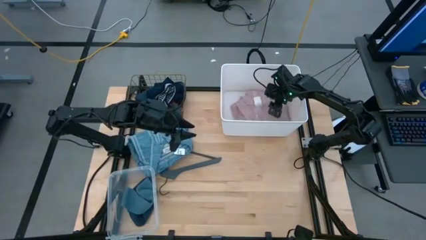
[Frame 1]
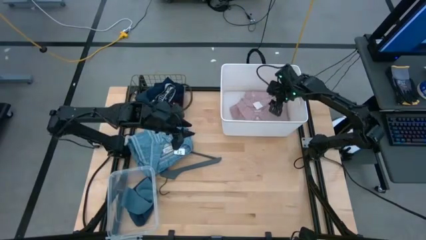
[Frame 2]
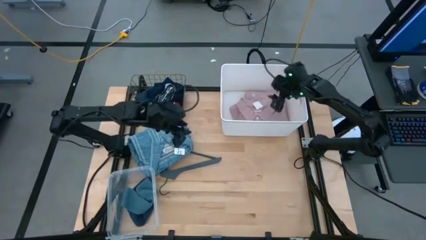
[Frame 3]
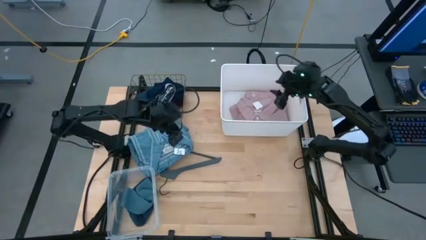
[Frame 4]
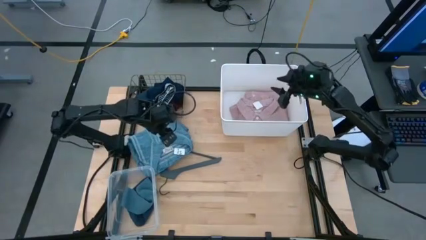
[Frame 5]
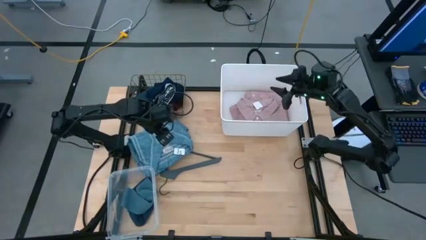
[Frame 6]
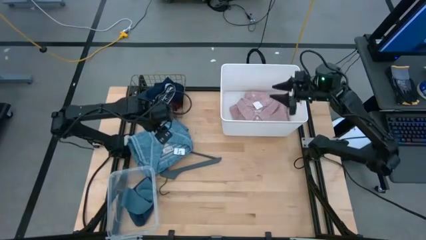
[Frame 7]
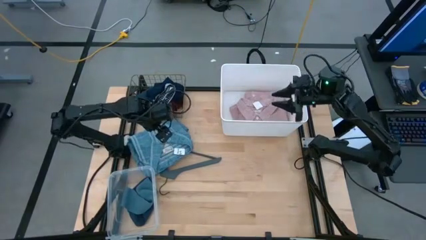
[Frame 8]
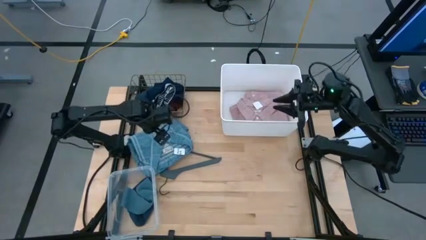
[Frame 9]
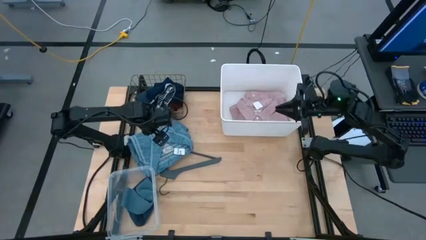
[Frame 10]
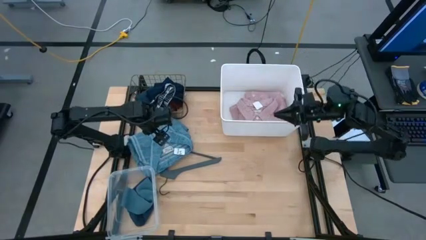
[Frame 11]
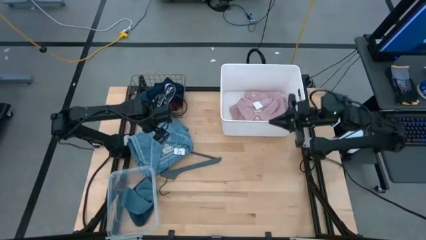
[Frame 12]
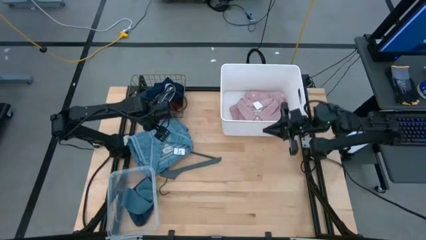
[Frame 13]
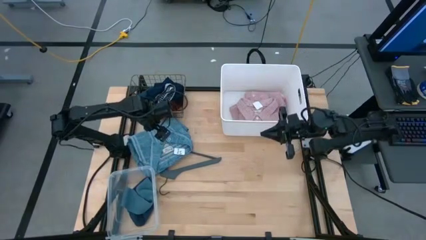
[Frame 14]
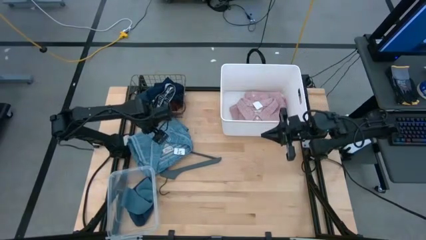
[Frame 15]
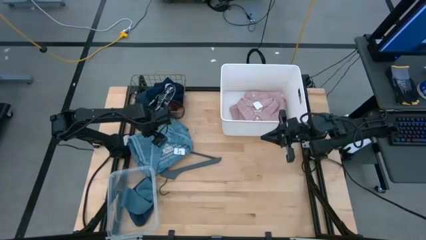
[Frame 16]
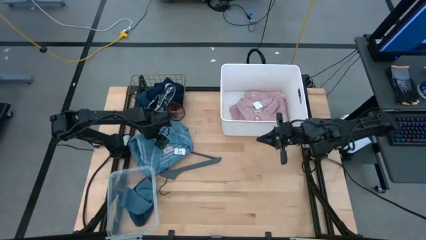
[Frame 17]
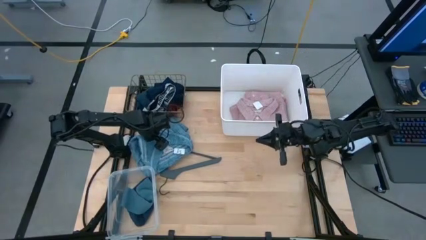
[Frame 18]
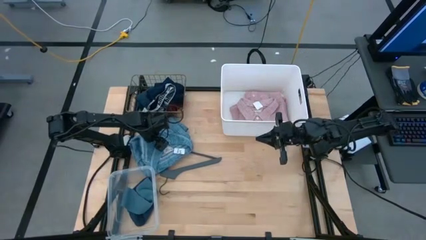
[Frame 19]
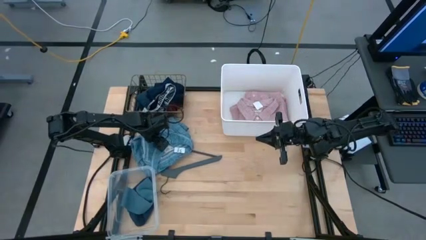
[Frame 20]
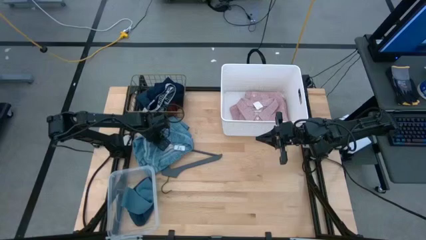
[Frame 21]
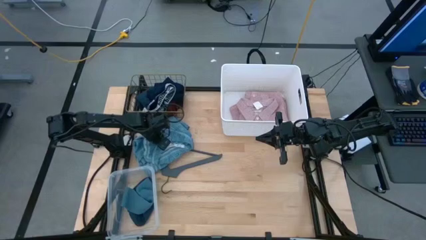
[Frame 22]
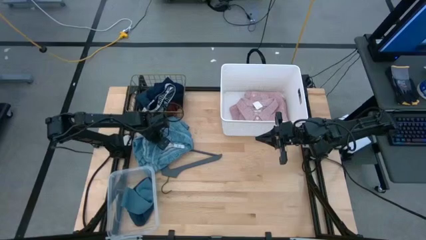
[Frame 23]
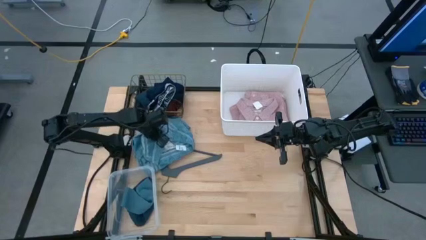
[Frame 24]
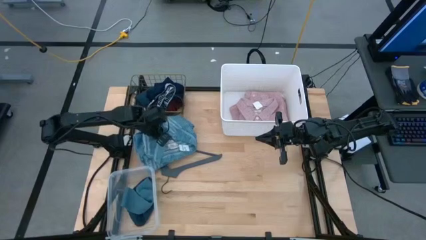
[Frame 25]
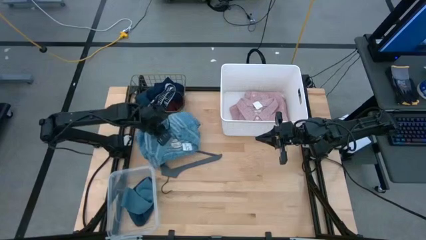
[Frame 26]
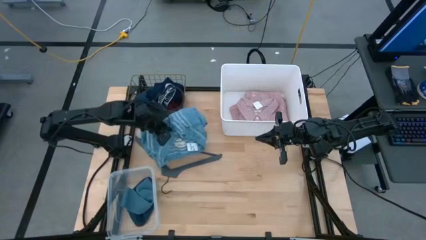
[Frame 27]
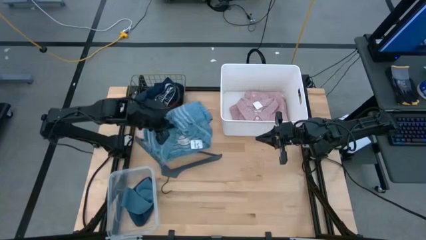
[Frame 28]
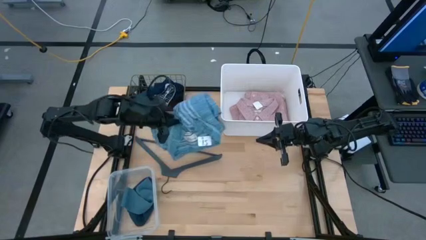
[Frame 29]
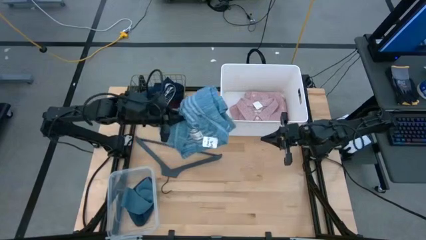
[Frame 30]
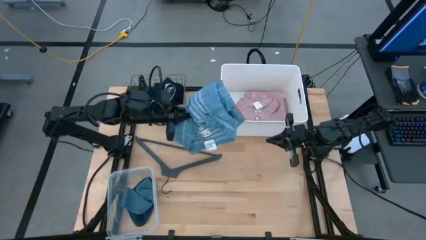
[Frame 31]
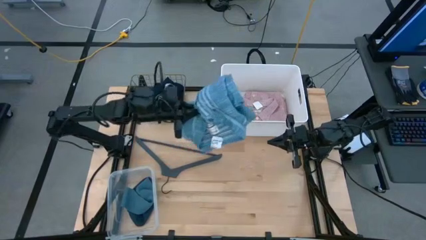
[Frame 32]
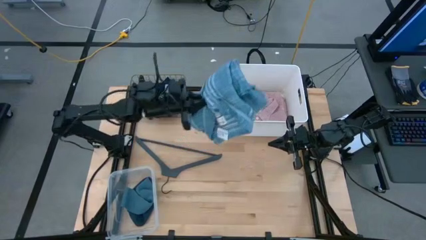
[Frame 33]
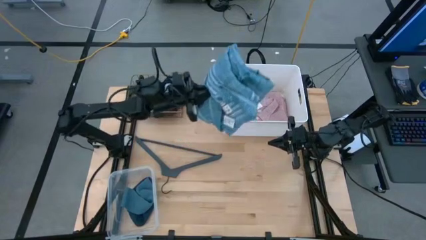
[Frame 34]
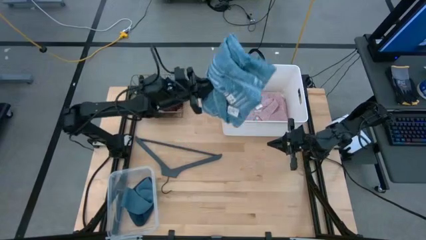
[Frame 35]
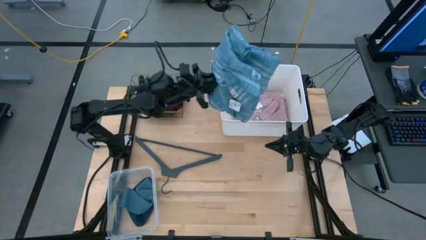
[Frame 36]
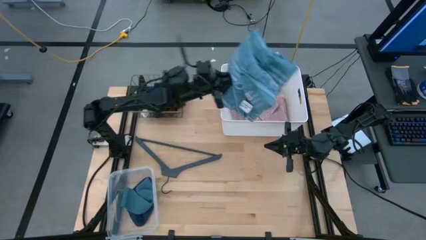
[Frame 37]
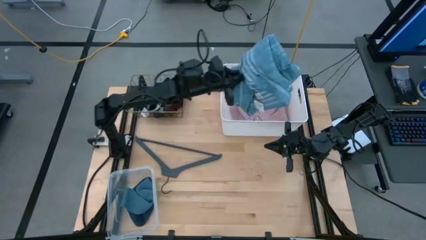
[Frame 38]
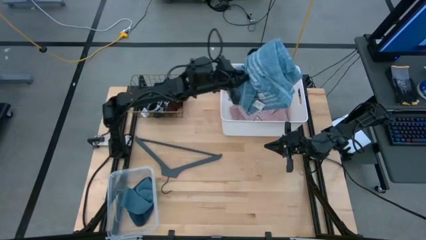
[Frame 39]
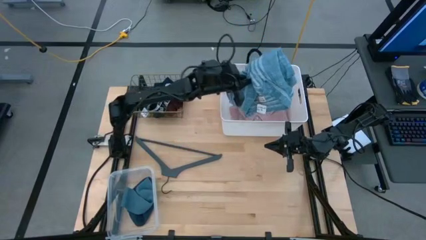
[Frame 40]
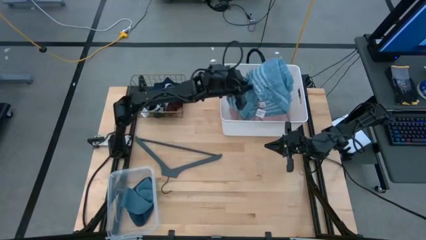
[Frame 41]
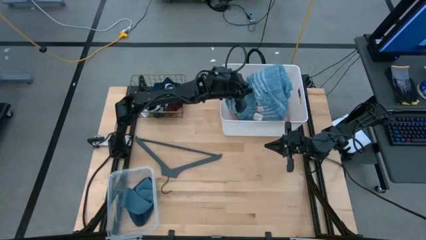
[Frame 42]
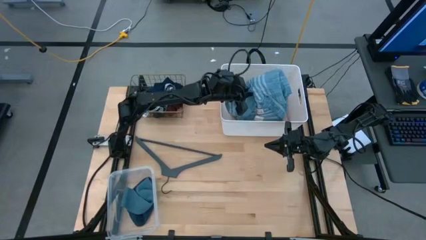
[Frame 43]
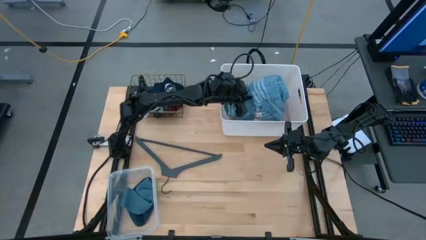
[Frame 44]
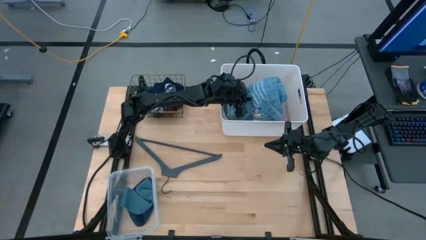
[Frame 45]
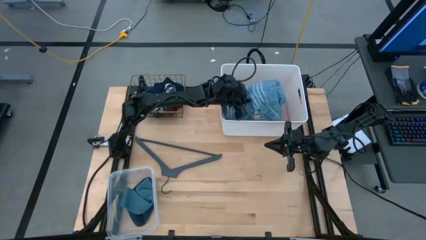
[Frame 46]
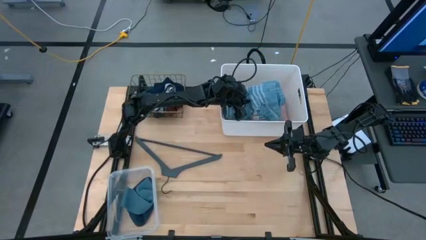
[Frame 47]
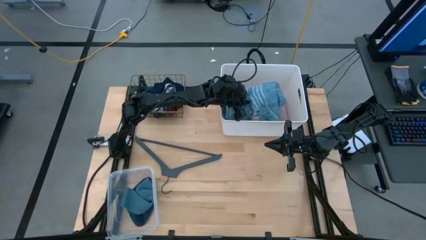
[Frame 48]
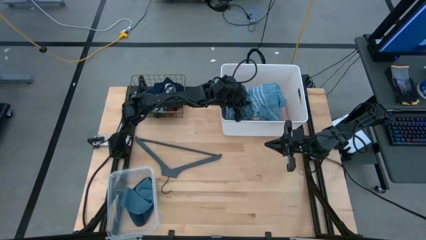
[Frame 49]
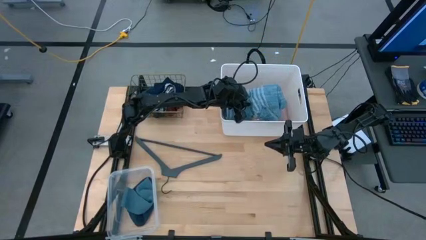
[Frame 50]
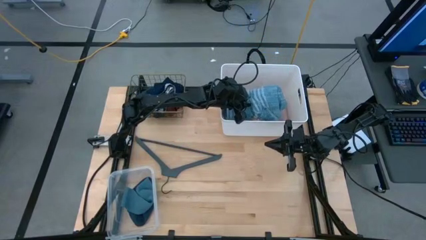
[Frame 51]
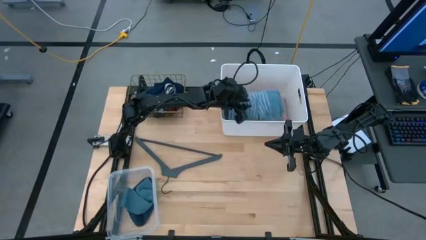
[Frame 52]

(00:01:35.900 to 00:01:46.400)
Task: Pick & Place Cloths
Put the blue shirt into the white bin

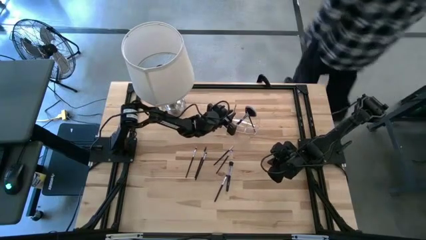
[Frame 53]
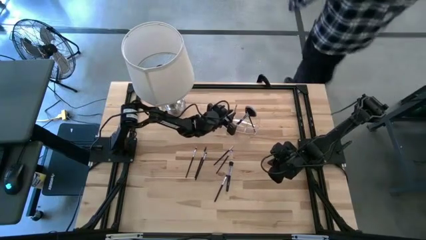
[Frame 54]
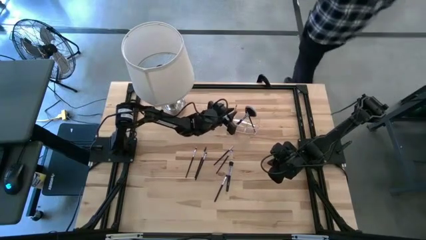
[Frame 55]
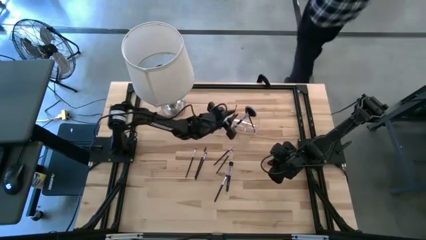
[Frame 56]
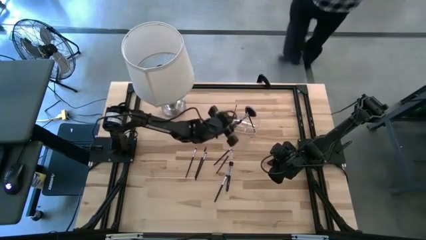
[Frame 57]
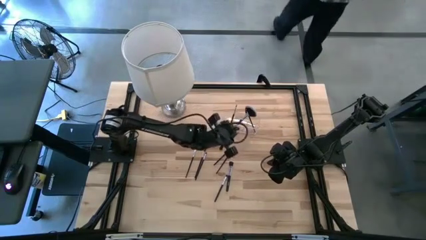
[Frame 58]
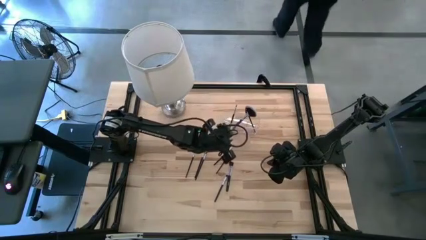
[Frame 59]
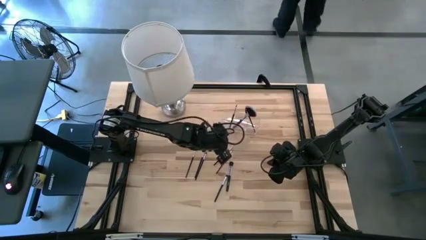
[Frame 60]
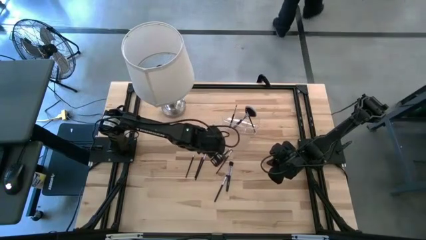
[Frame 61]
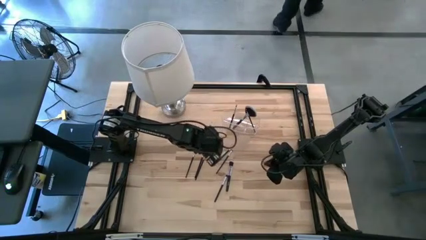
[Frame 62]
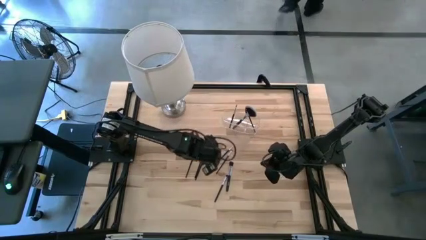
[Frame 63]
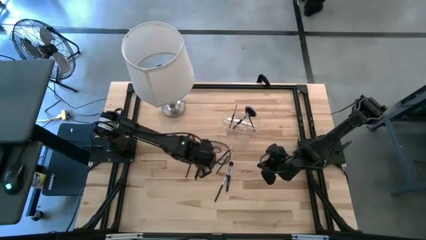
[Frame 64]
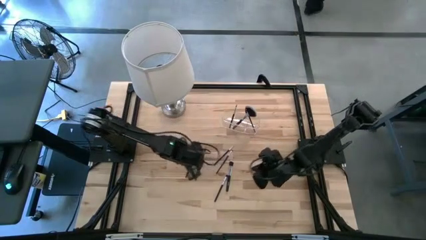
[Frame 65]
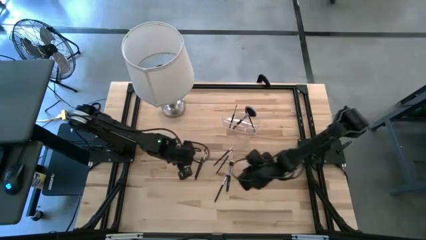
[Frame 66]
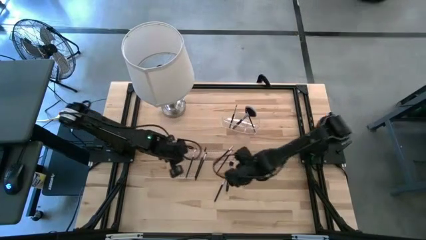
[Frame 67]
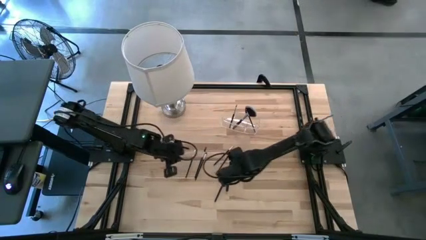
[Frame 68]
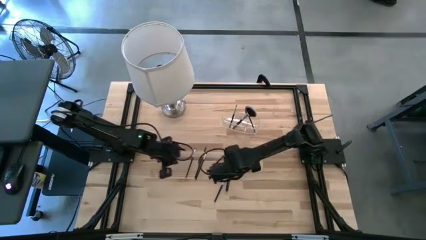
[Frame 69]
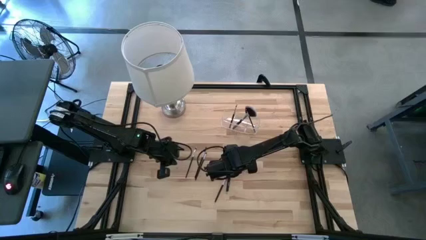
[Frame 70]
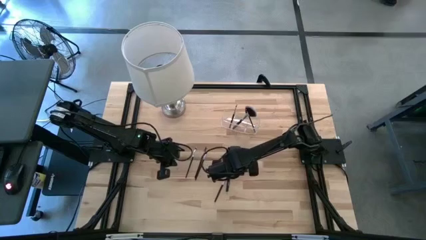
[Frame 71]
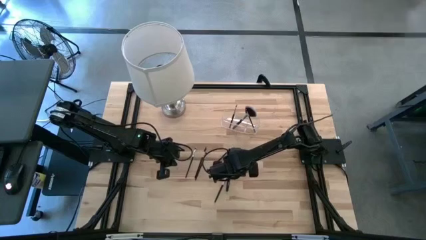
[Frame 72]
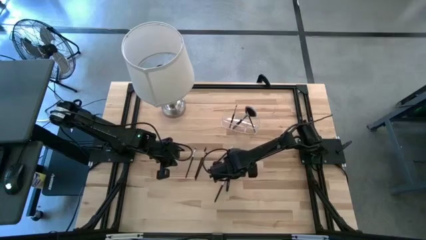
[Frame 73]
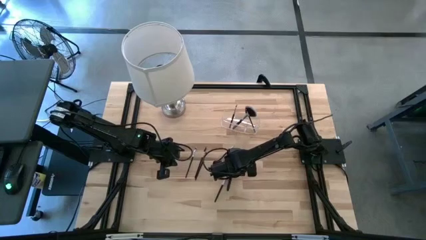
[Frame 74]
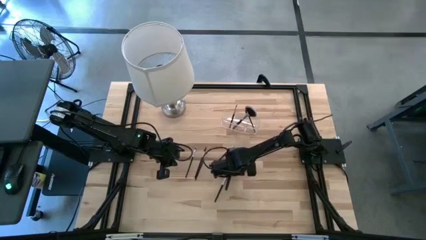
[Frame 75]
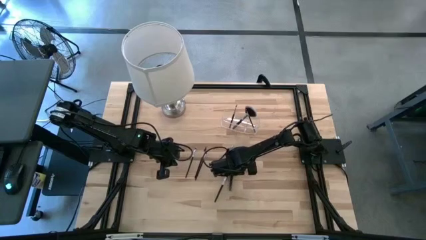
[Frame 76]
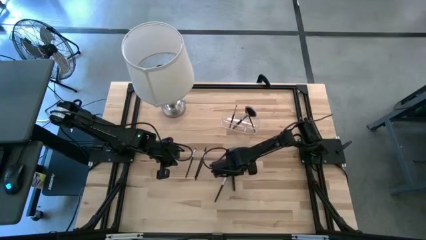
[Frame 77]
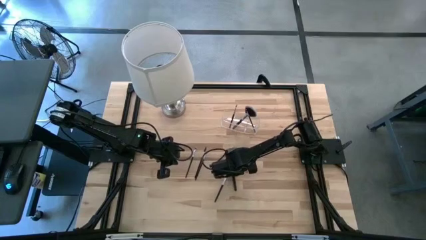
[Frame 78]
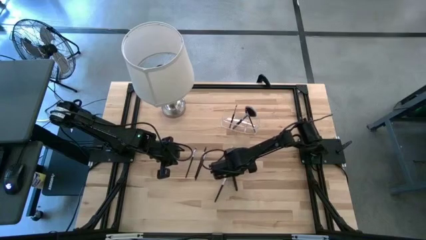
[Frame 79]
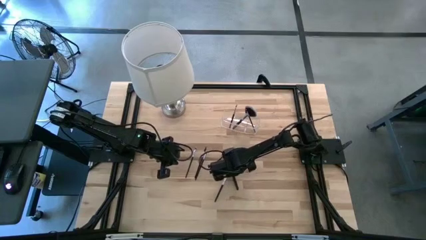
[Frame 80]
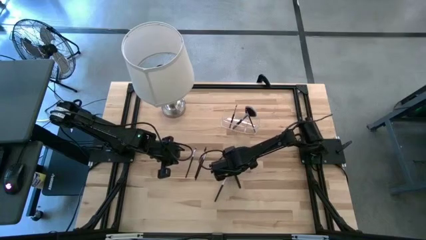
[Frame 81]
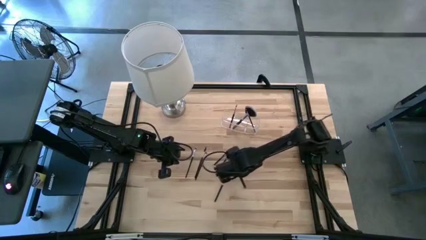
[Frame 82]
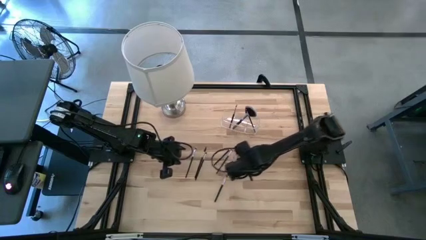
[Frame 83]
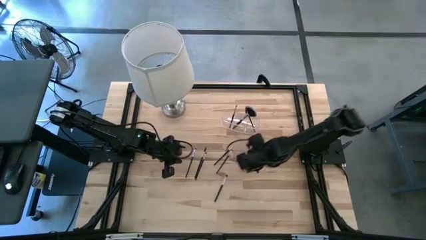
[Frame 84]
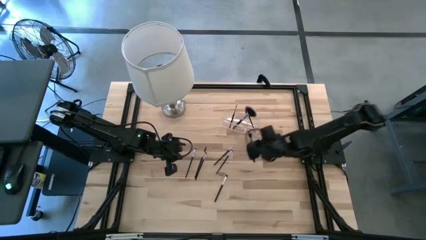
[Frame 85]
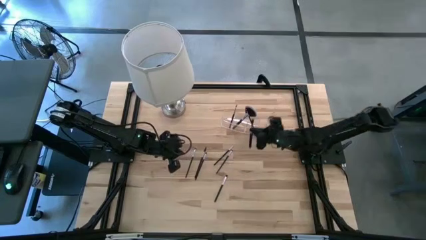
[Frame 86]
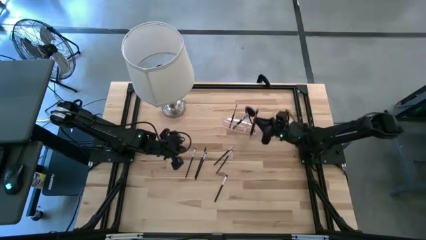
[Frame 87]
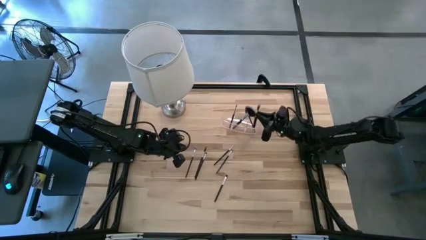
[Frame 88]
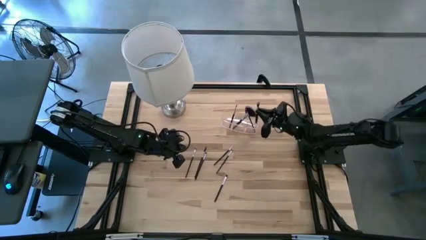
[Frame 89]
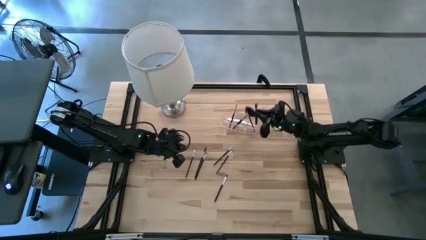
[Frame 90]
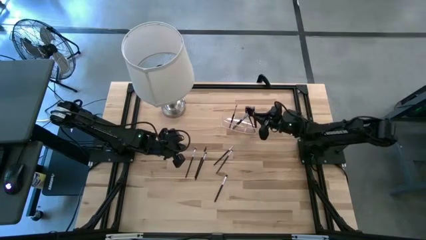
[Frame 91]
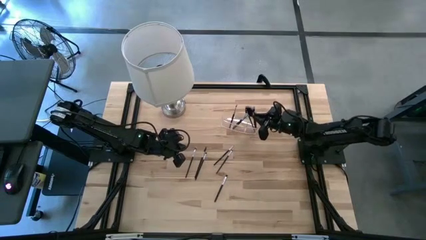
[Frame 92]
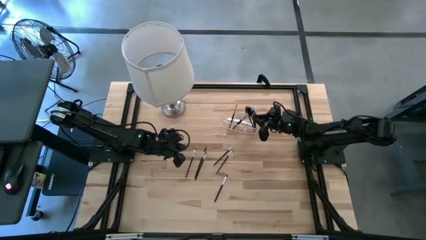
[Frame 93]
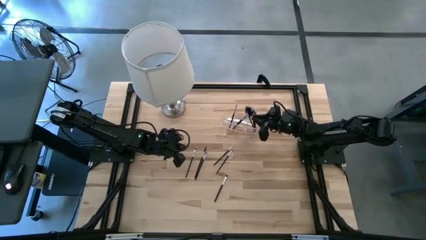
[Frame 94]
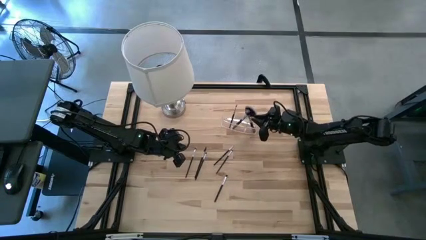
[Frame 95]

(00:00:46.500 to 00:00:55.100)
Task: Pick & Place Makeup Supplies
Put the makeup brush into the transparent organizer
